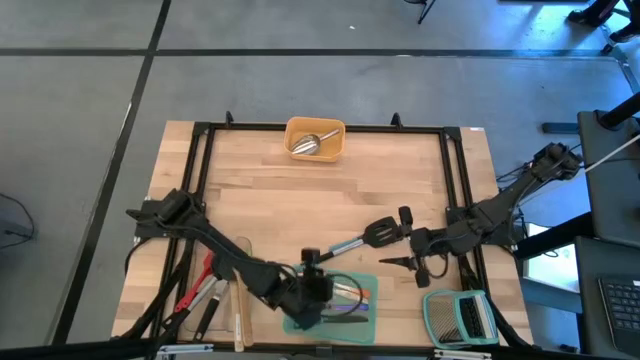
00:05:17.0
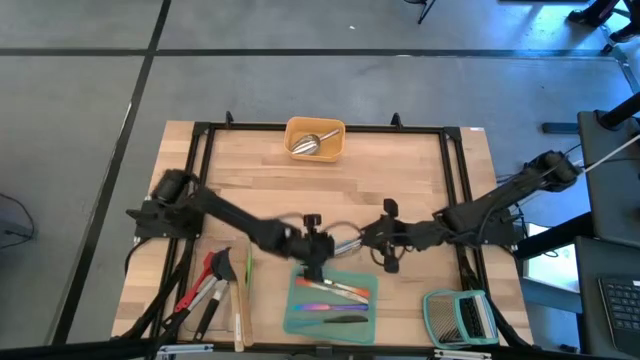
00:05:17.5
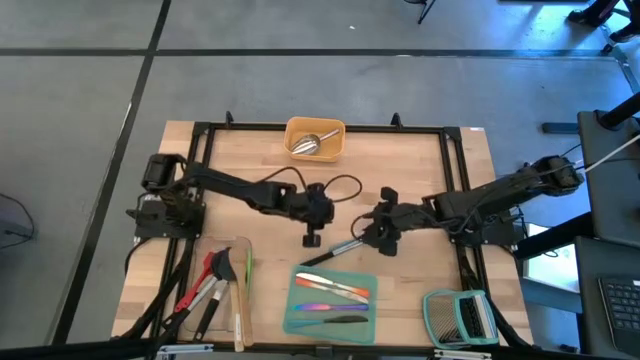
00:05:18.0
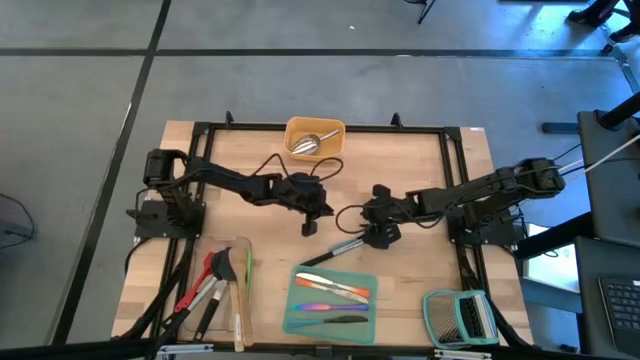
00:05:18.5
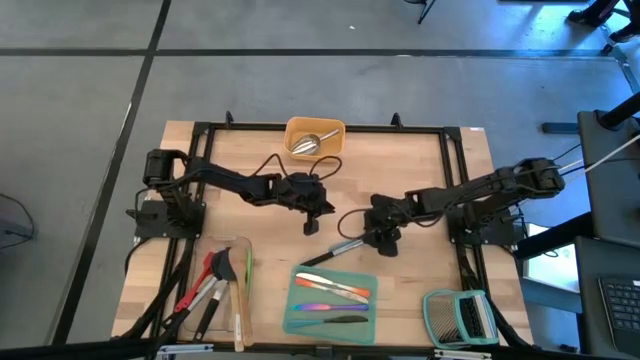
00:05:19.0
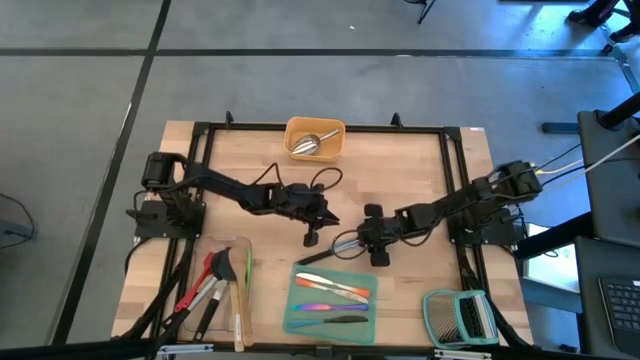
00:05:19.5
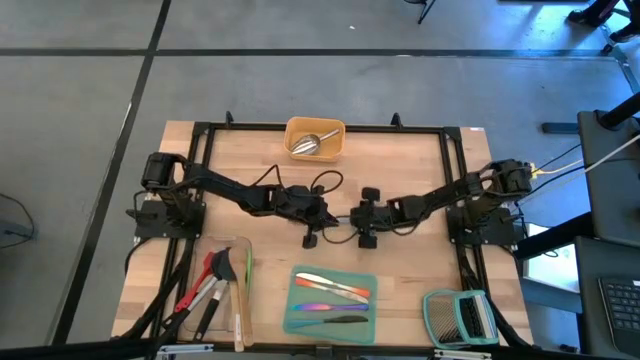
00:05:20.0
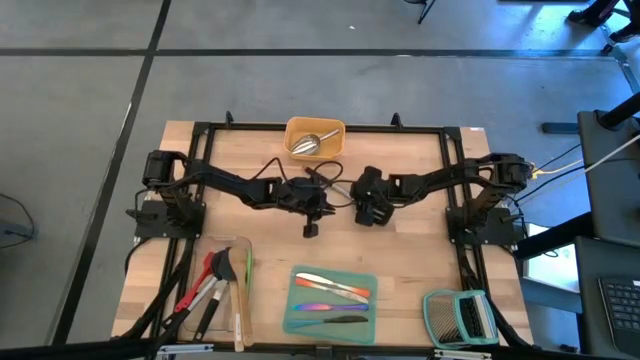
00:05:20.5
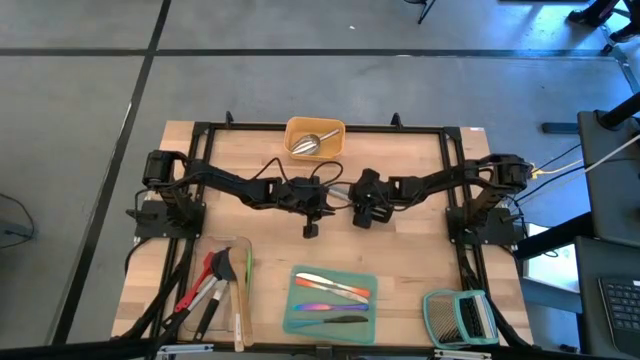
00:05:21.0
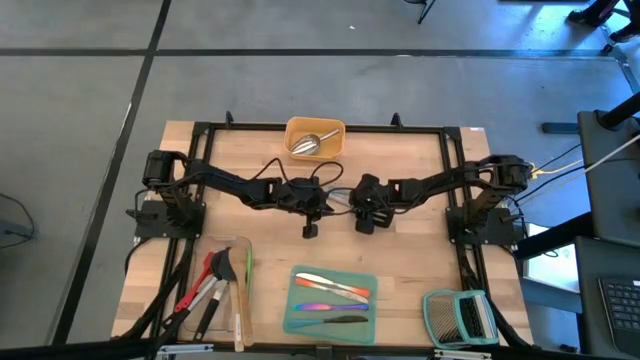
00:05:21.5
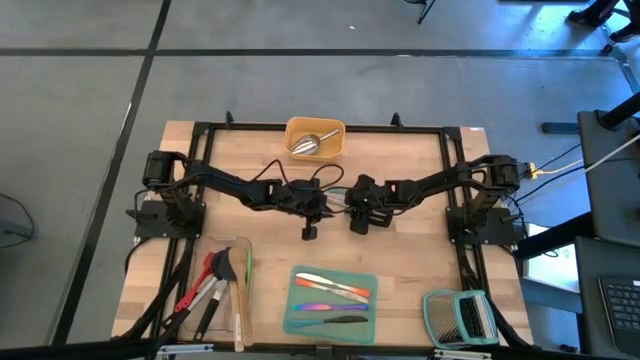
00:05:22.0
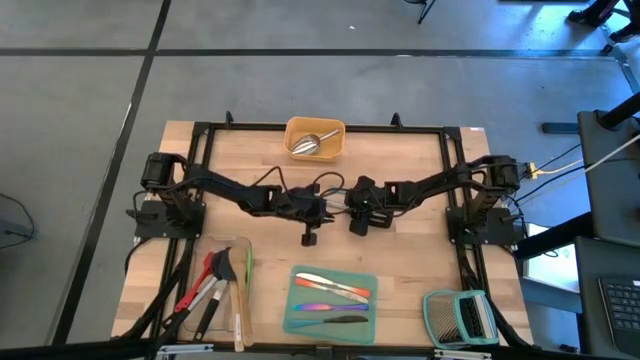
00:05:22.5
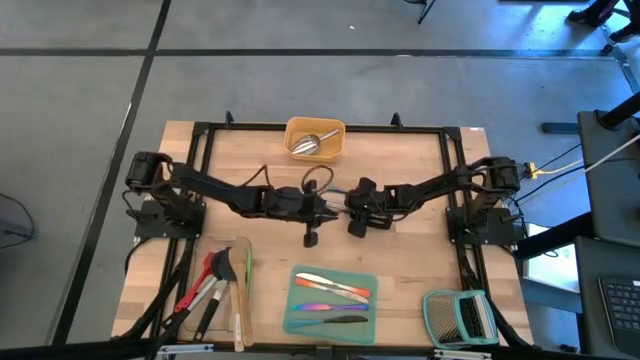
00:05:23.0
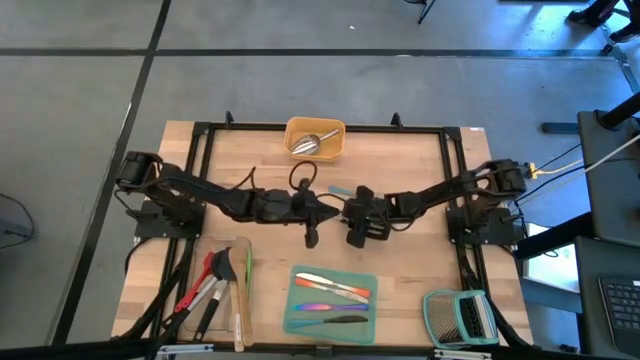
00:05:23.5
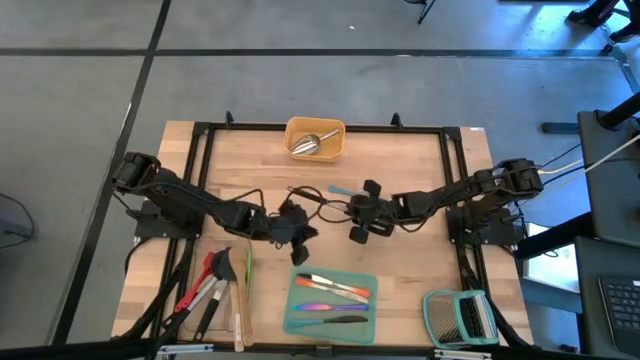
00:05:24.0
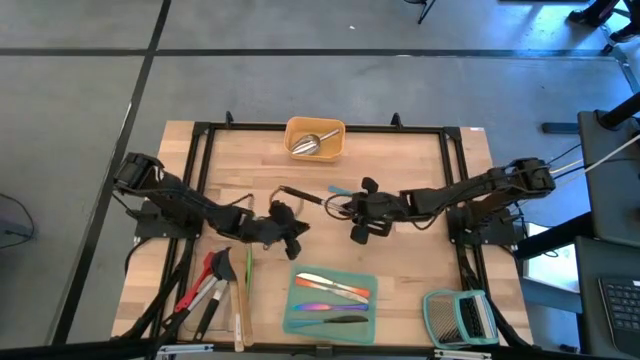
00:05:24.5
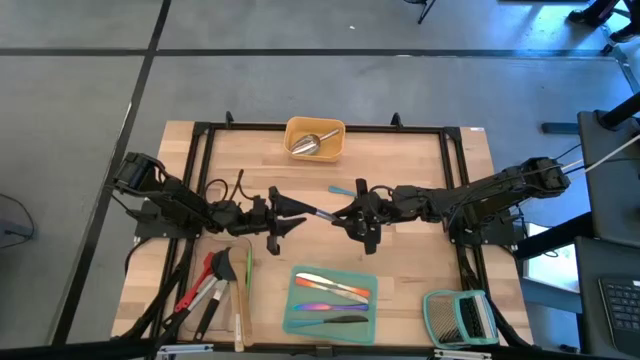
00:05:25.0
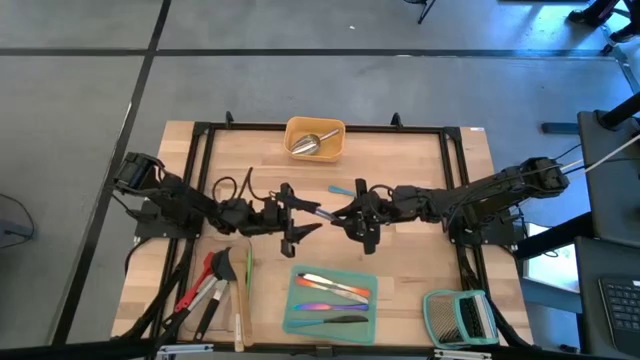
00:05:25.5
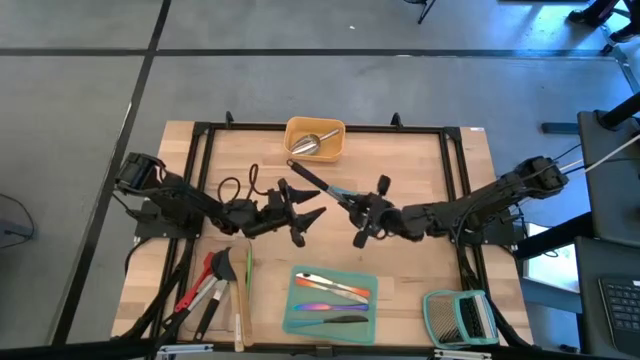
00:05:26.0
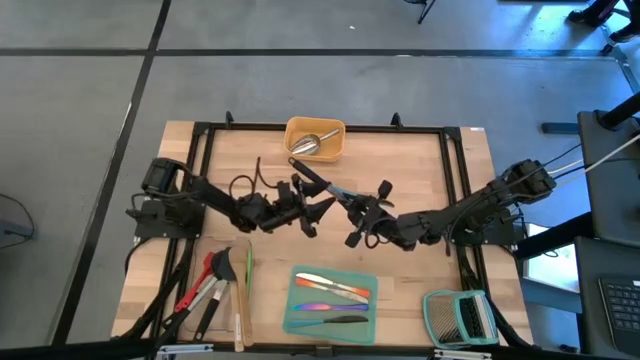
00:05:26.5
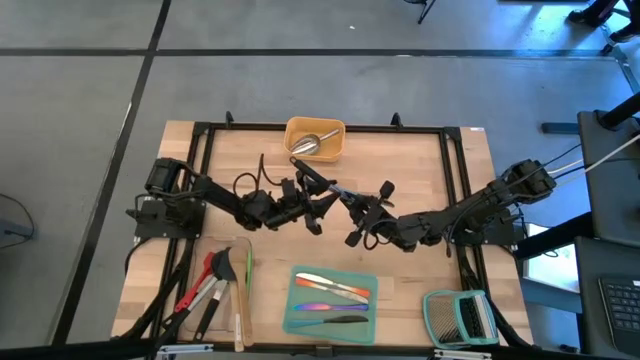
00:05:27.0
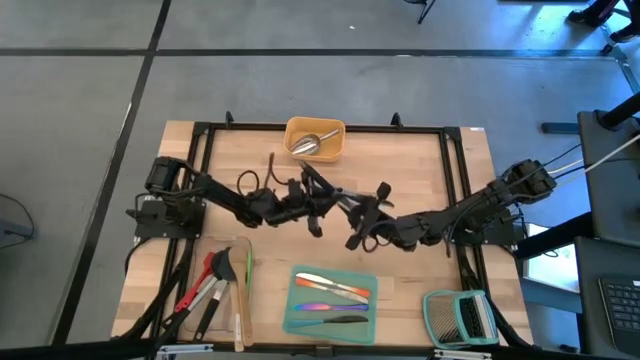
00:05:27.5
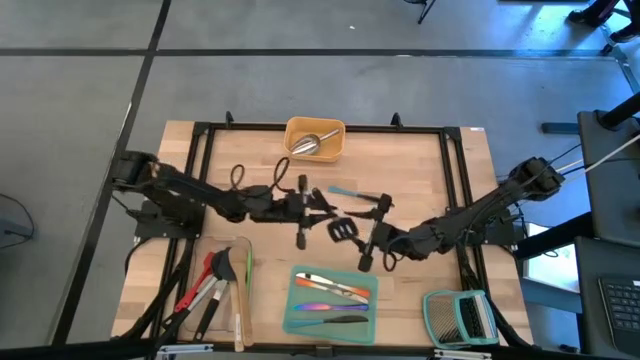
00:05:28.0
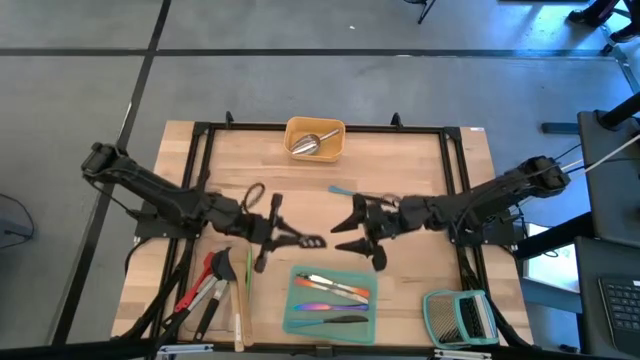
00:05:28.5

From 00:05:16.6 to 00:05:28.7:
Task: Pick & Place Kitchen Items
Put the slotted spatula into the transparent bin

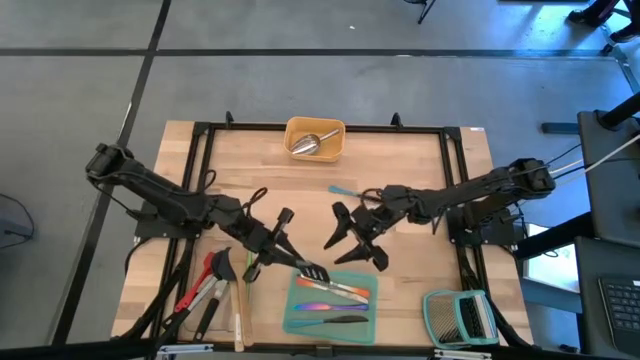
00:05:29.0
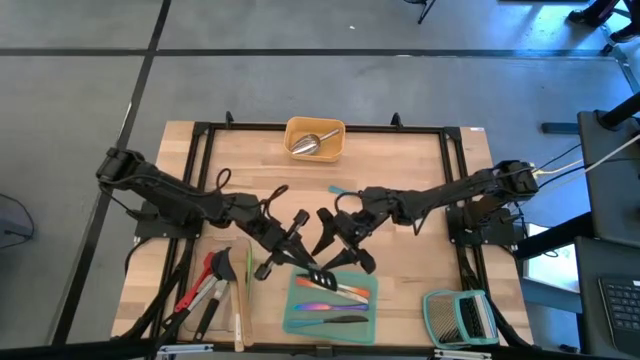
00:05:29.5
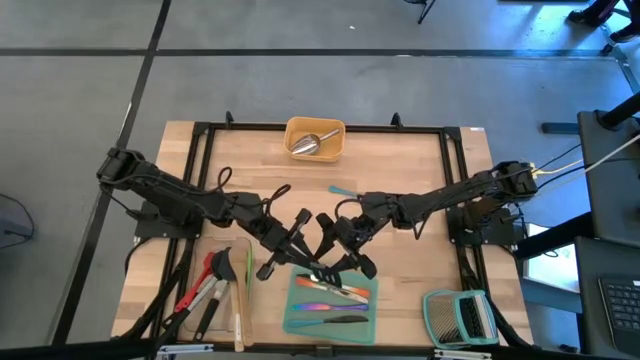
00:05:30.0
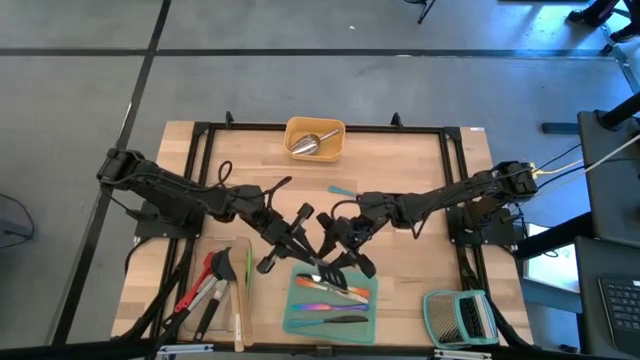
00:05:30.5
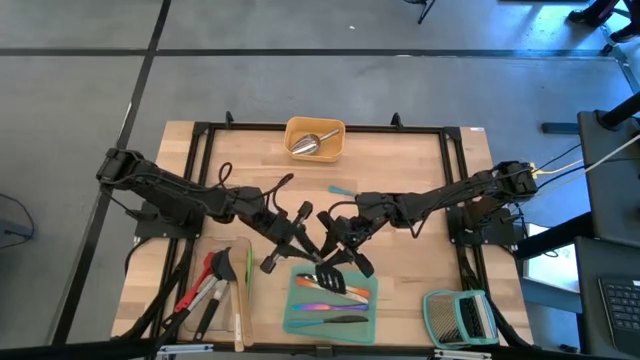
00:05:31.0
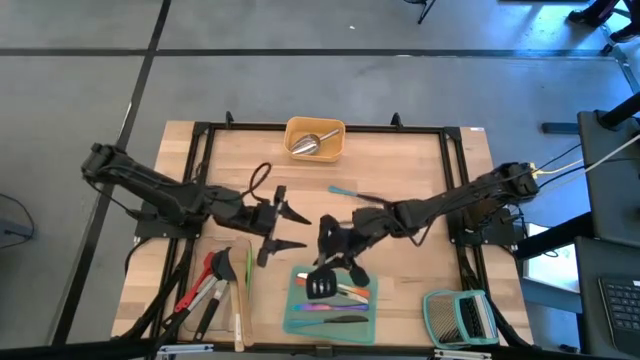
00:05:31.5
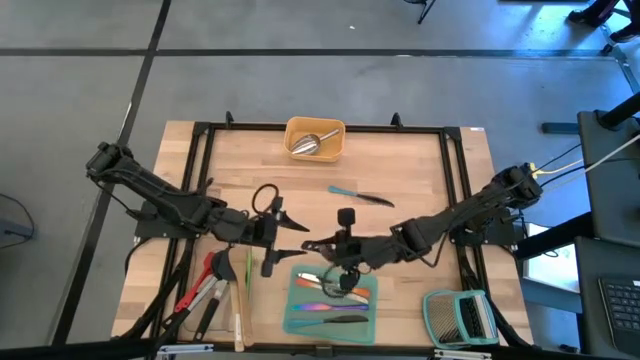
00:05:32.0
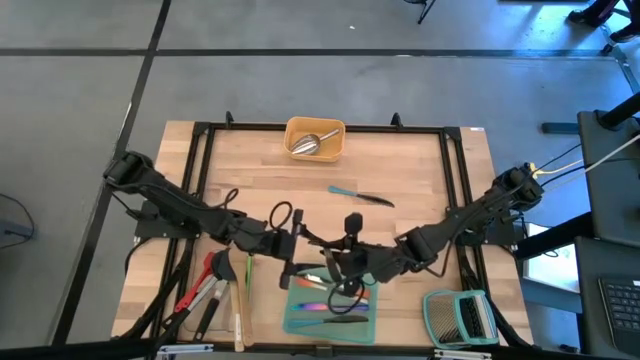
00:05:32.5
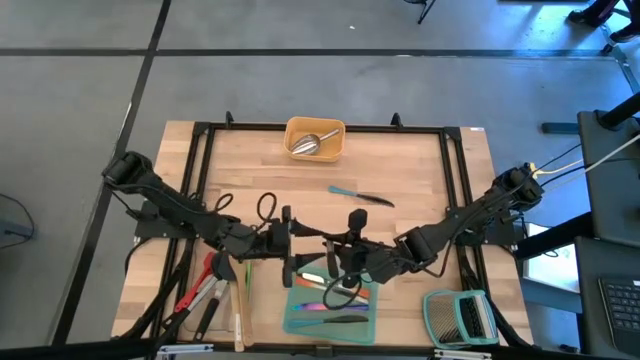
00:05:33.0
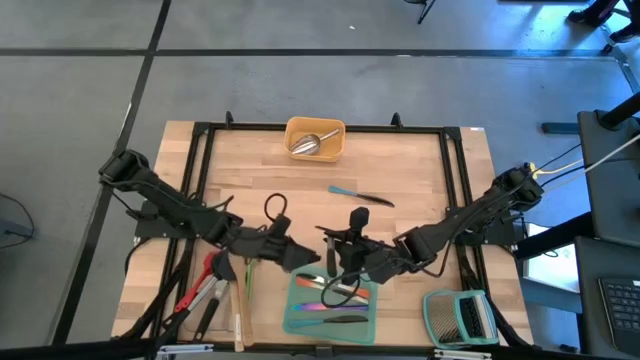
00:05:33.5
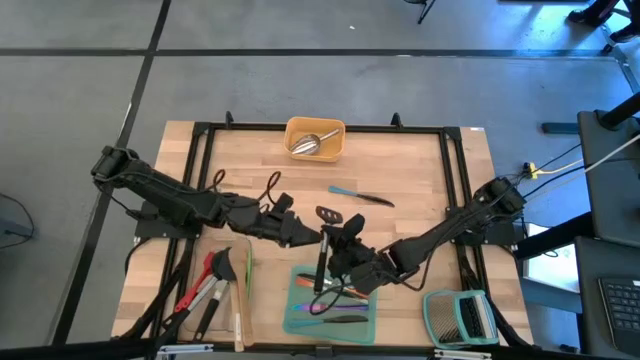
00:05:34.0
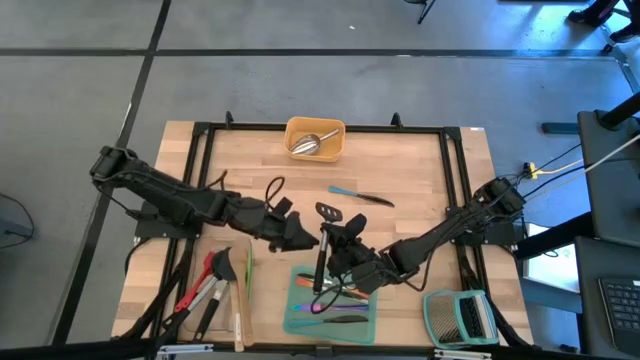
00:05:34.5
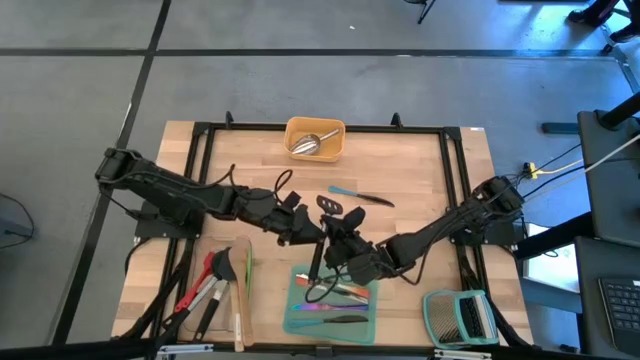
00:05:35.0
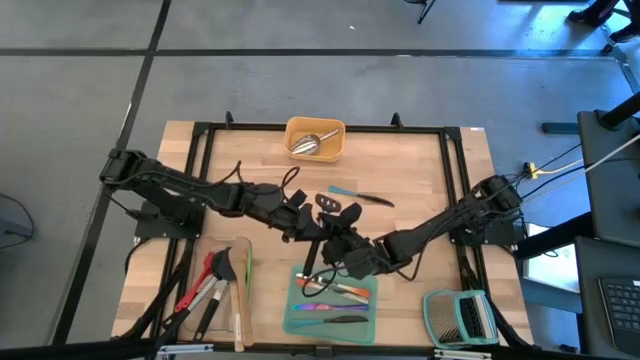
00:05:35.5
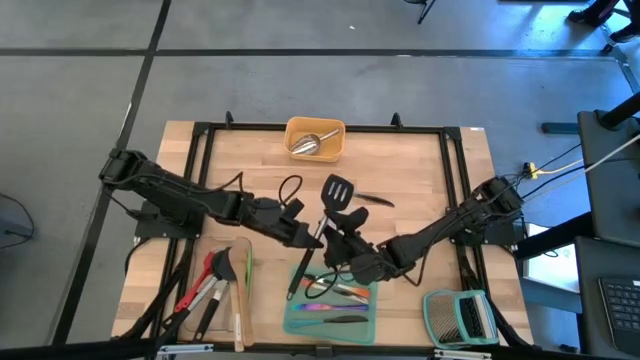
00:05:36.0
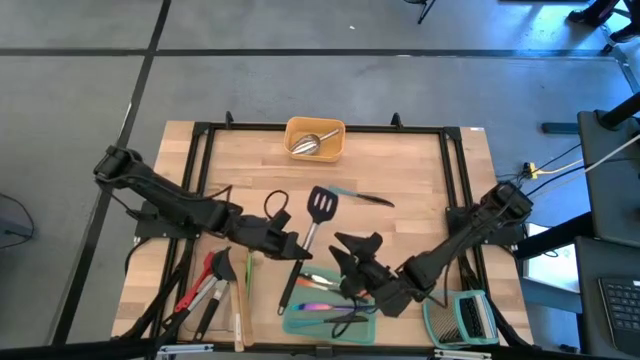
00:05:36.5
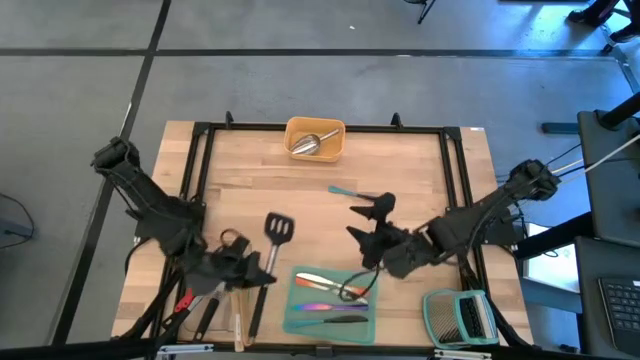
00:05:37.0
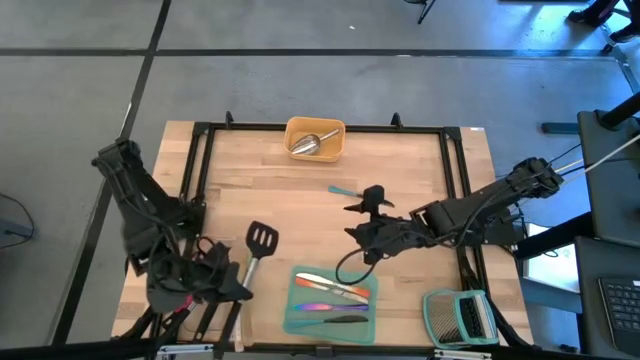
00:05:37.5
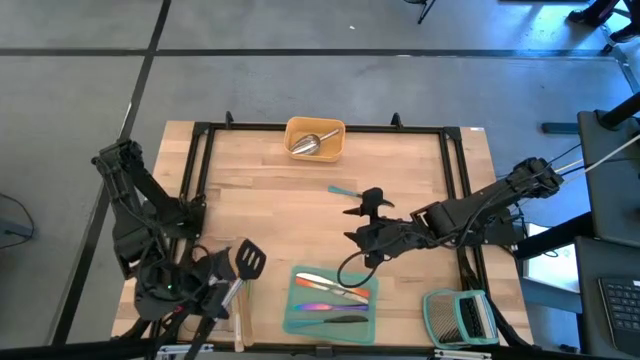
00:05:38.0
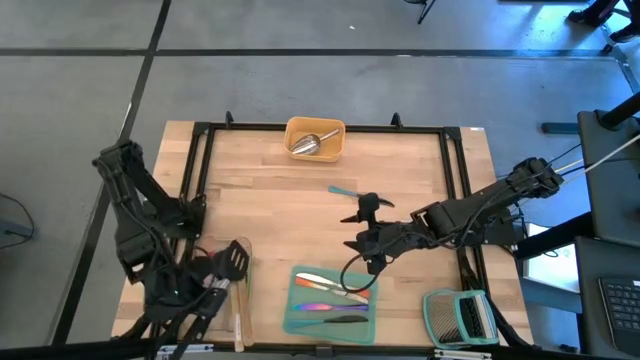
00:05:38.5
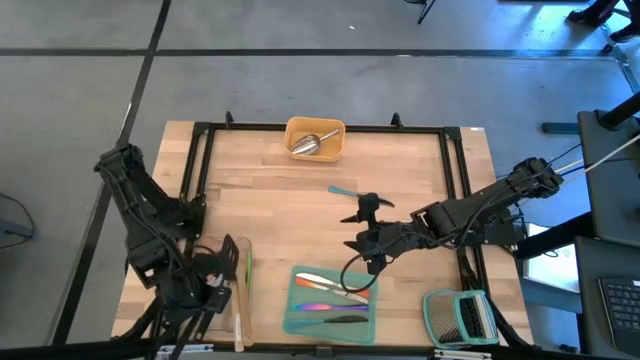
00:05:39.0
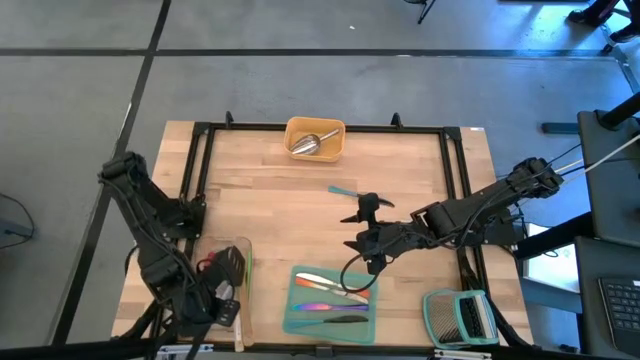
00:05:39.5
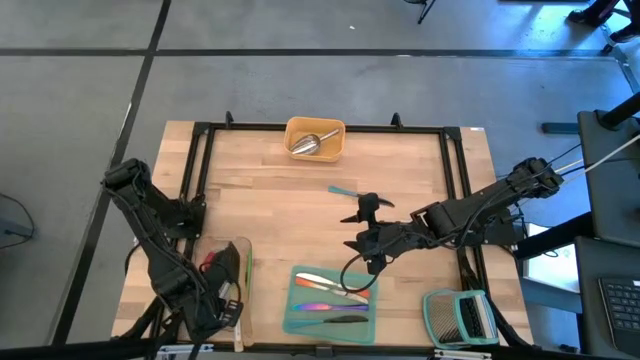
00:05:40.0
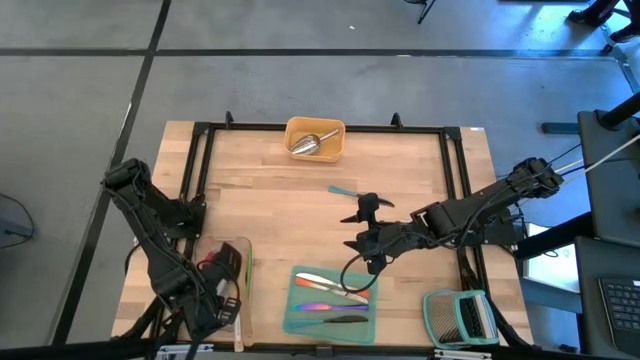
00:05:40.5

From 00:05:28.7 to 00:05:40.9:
Put the slotted spatula into the transparent bin
